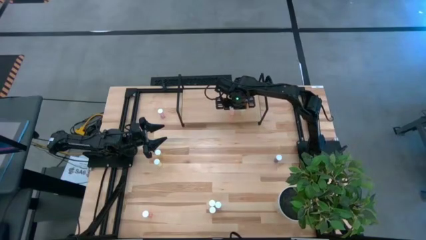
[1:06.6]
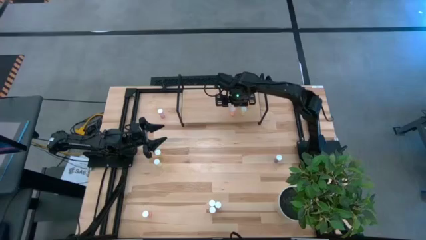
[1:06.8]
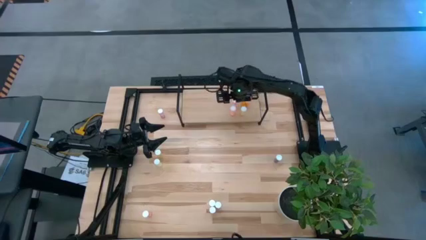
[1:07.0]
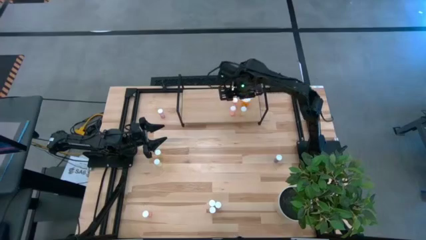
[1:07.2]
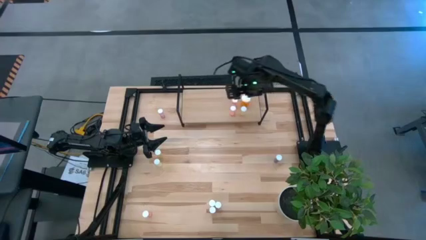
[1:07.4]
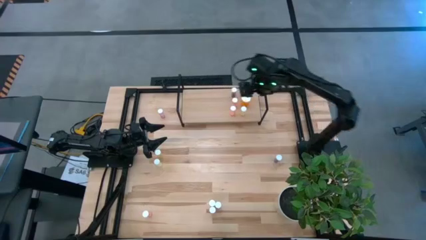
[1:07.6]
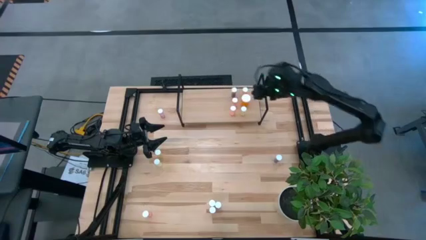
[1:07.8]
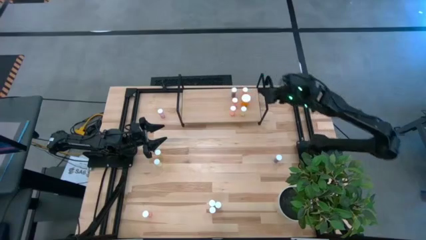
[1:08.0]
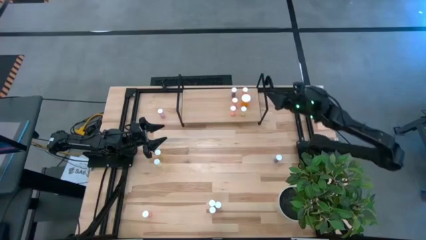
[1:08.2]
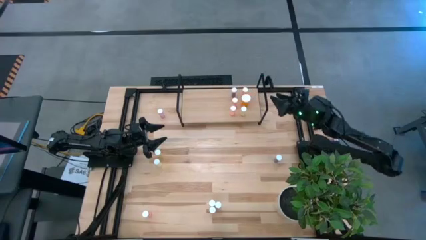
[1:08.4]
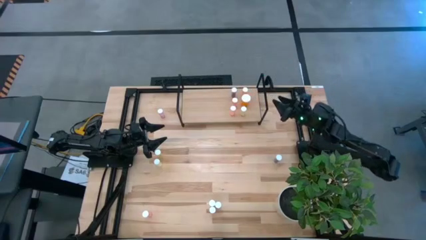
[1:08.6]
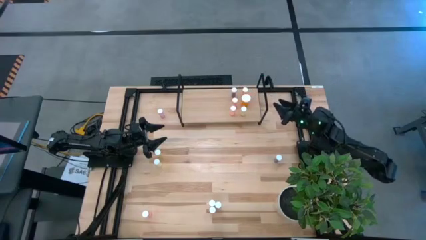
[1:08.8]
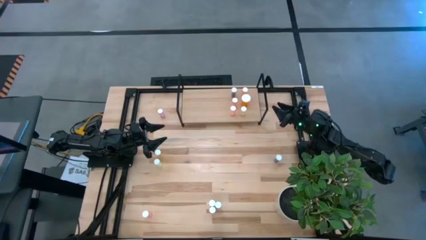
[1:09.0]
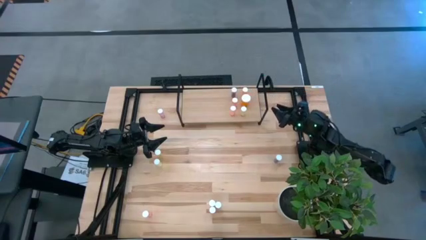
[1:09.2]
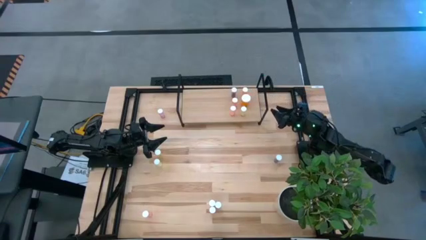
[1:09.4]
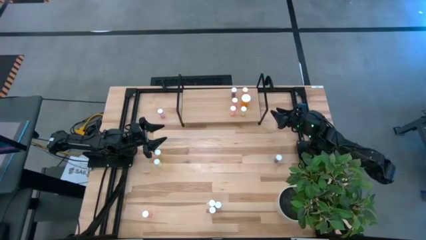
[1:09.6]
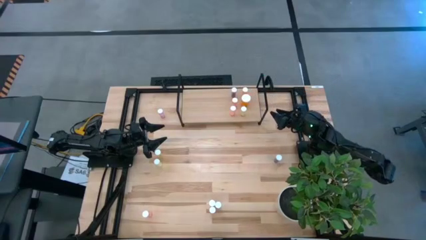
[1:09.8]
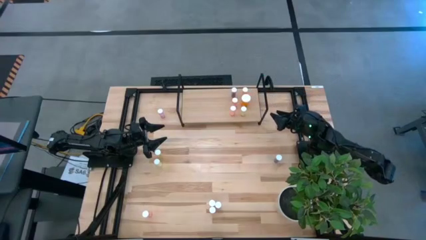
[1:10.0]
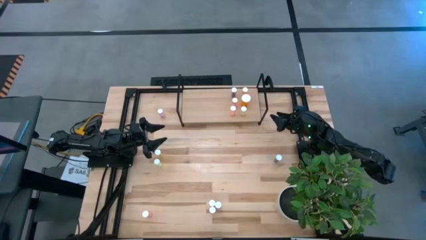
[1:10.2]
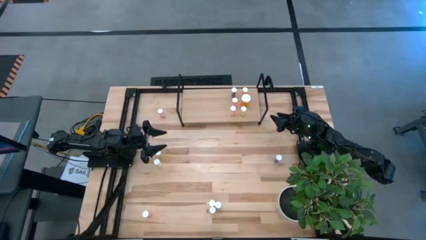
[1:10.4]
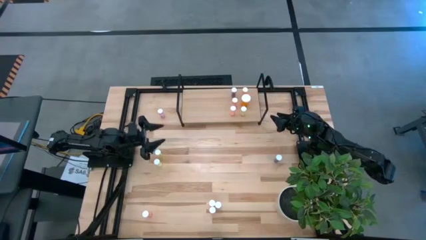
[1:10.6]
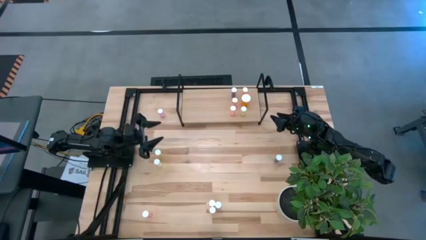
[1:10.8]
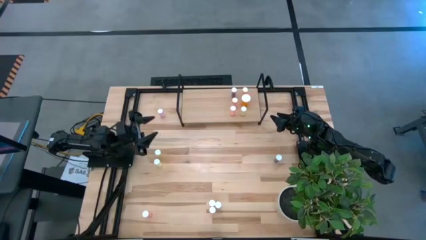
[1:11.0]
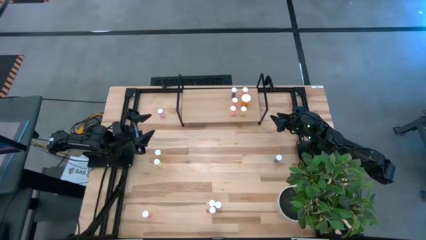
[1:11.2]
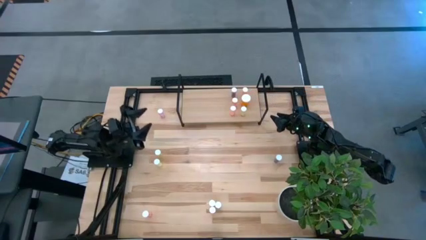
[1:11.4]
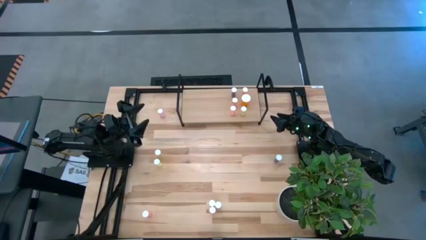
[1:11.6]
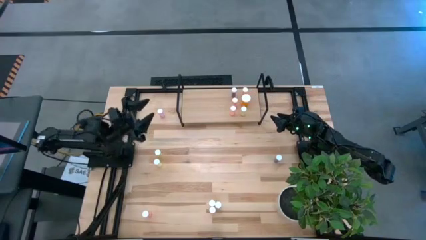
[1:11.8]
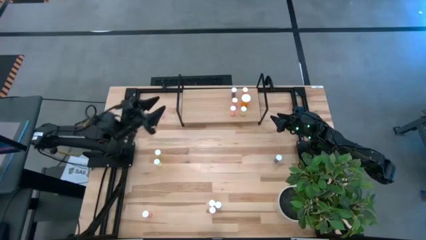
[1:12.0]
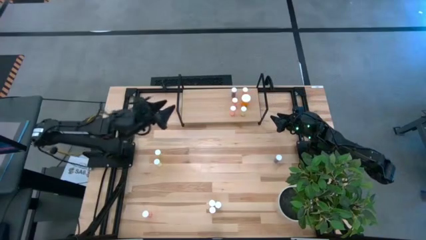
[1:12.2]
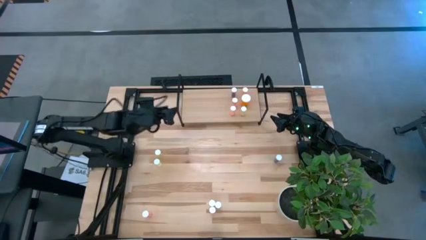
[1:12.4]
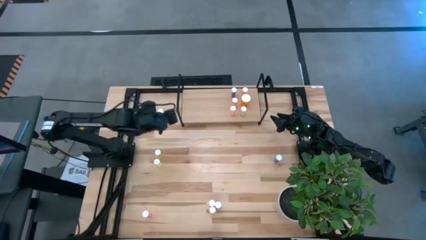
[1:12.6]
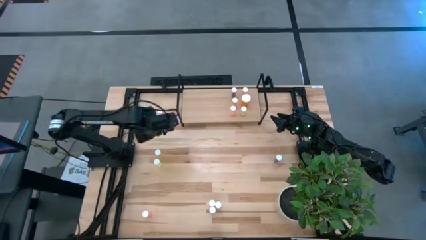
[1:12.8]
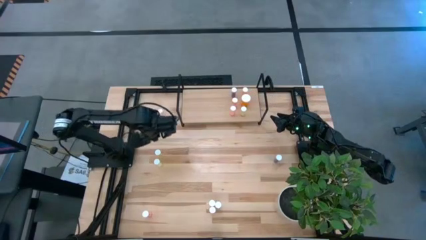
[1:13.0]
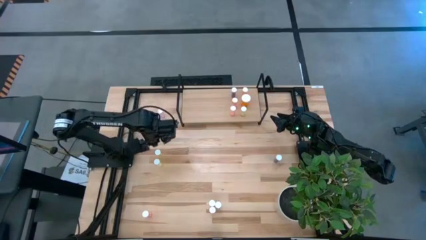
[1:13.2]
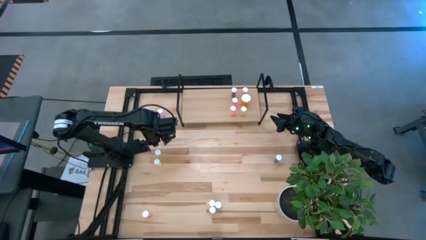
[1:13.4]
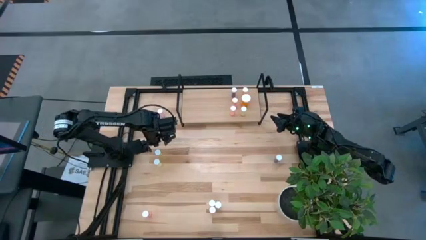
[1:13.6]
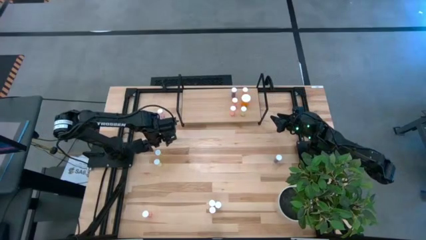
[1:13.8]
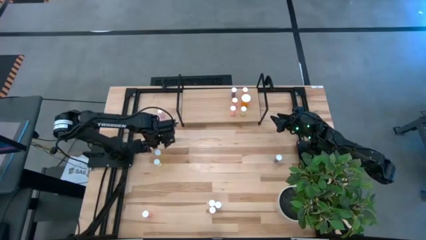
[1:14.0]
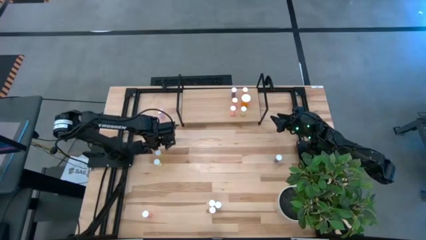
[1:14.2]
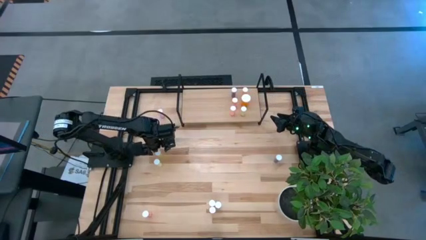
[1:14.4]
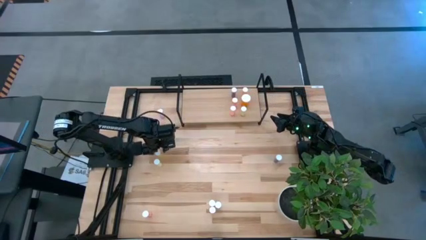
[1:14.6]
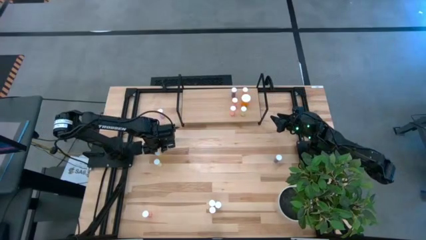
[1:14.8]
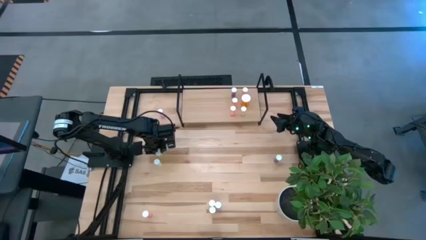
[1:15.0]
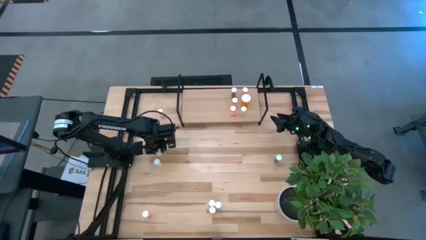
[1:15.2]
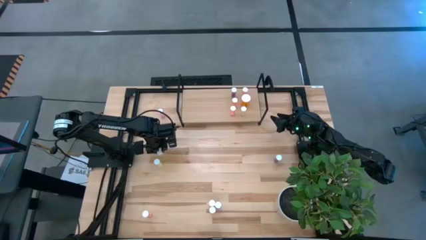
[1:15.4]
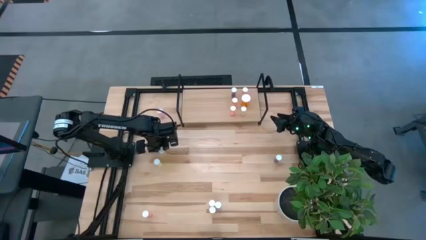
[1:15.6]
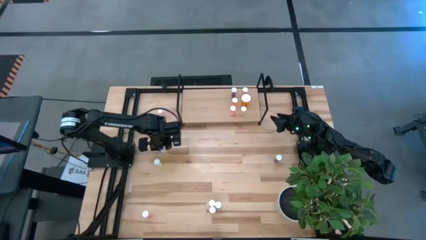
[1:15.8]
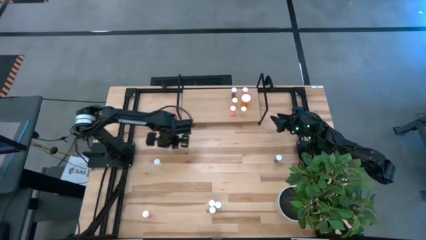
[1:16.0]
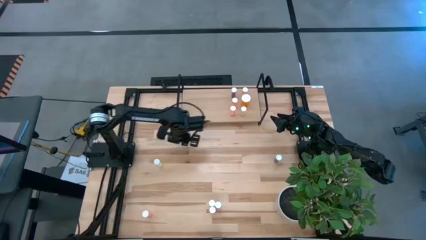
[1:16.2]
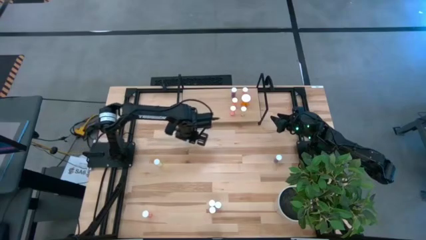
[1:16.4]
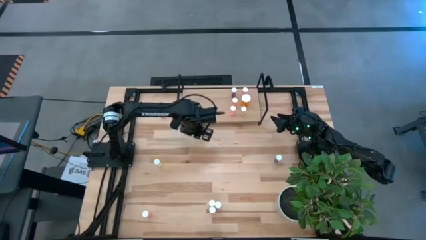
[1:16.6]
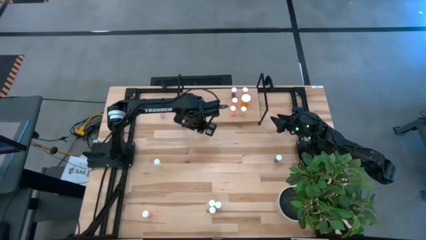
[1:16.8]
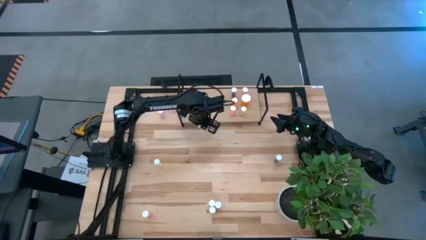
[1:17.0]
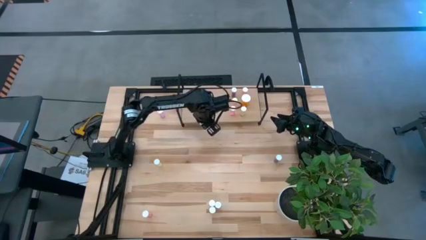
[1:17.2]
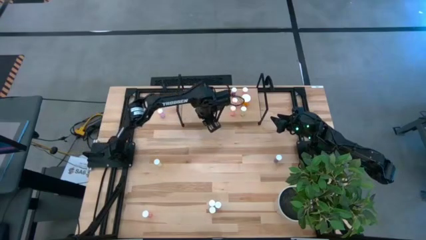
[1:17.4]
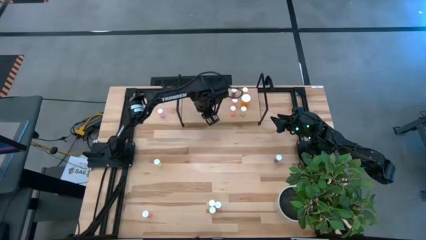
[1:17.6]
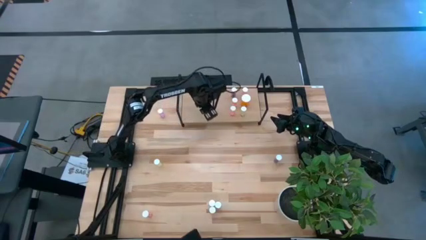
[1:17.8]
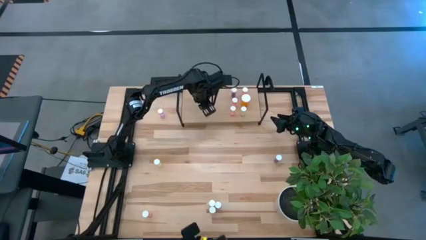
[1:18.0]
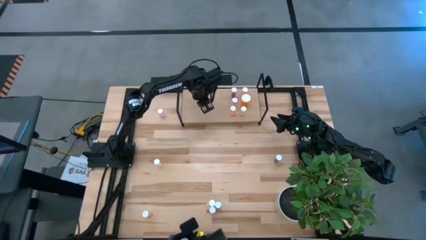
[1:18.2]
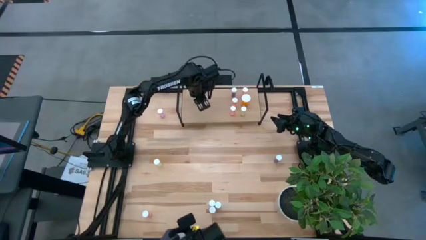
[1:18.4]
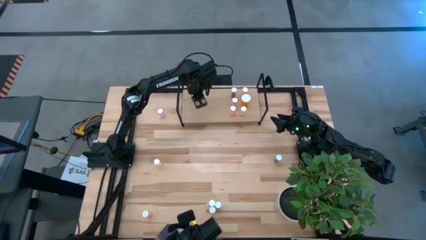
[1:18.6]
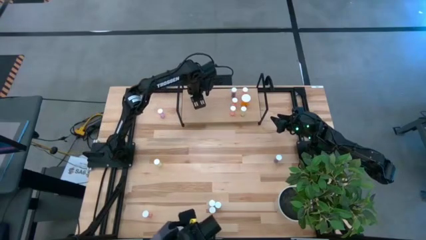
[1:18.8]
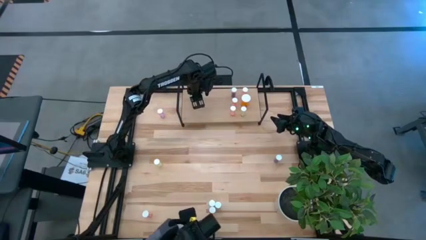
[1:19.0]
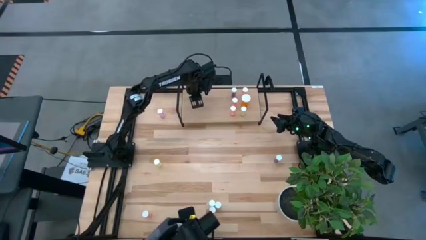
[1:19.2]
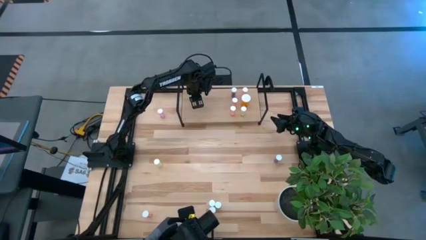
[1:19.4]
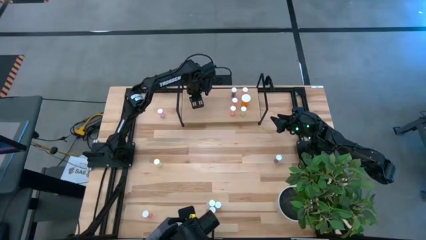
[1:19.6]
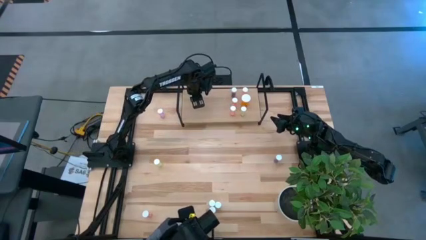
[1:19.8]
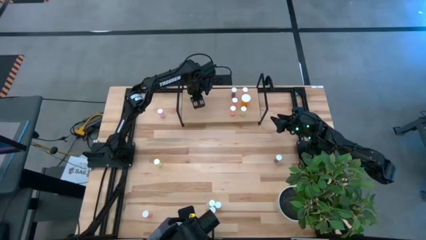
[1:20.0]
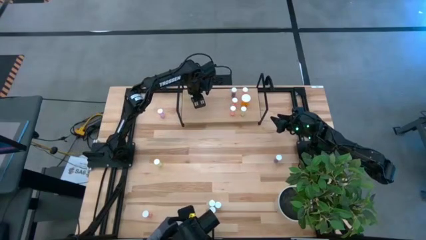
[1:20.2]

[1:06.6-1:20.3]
Task: Pick and place medicine bottles onto shelf by color
Put the yellow pill bottle on the shelf

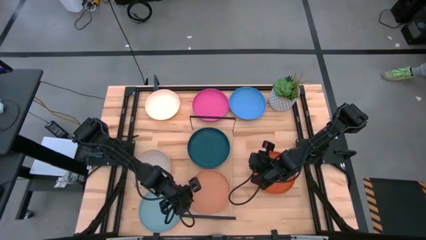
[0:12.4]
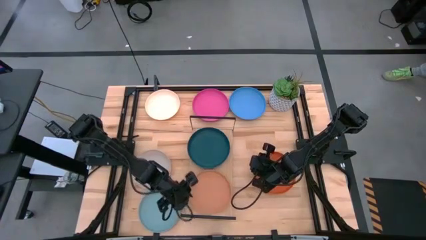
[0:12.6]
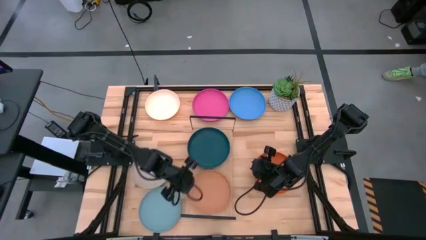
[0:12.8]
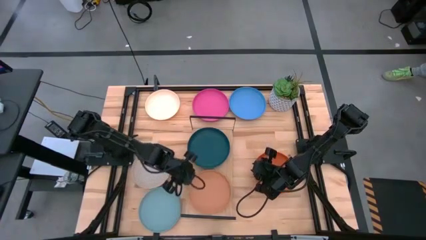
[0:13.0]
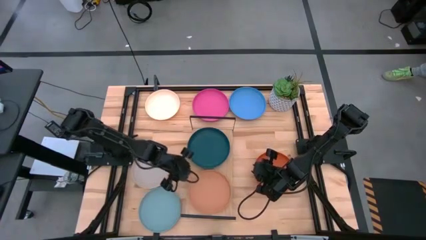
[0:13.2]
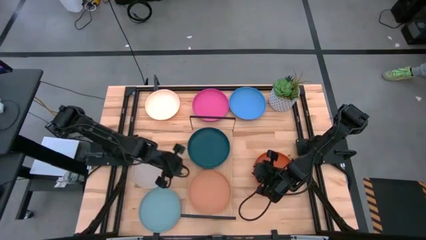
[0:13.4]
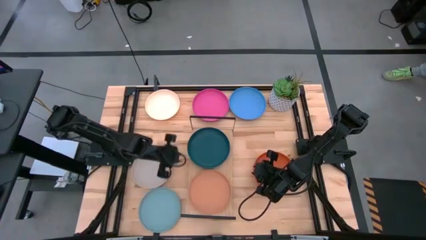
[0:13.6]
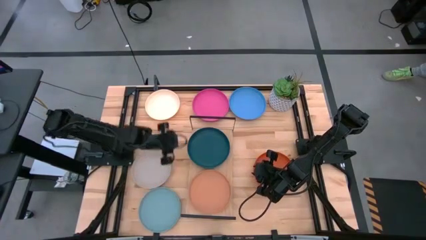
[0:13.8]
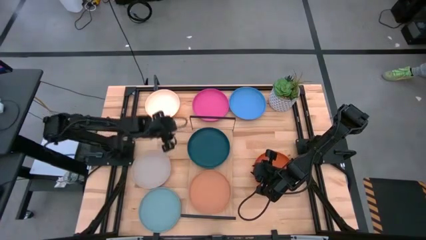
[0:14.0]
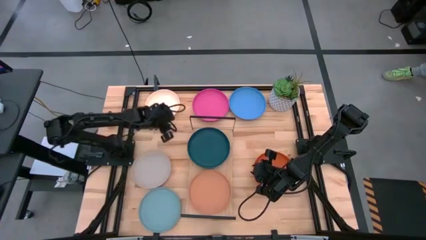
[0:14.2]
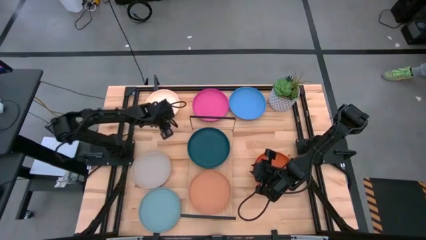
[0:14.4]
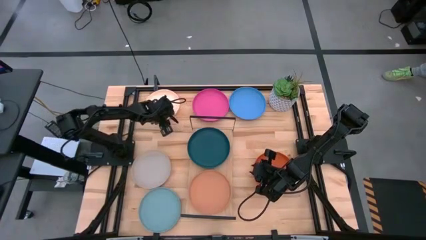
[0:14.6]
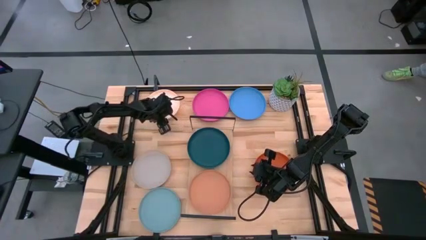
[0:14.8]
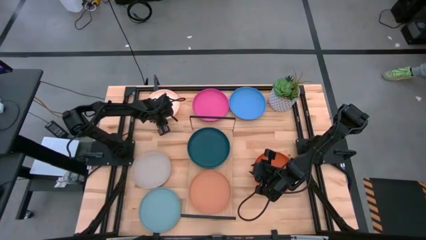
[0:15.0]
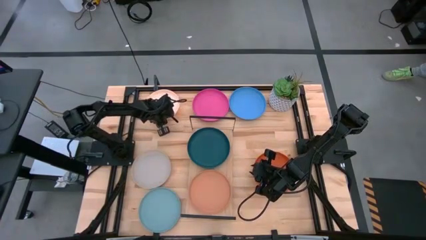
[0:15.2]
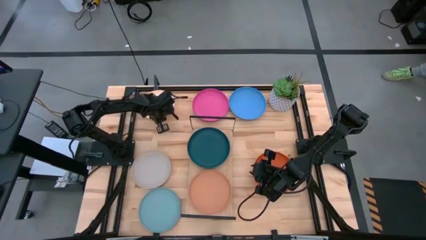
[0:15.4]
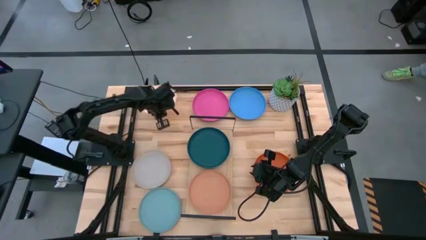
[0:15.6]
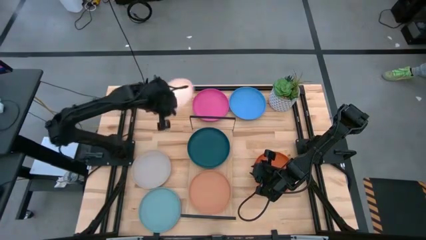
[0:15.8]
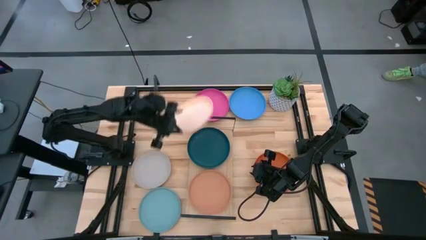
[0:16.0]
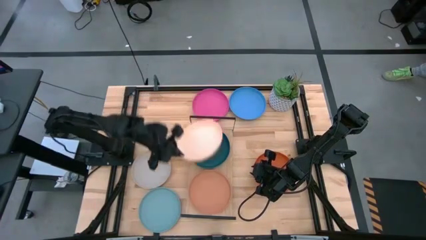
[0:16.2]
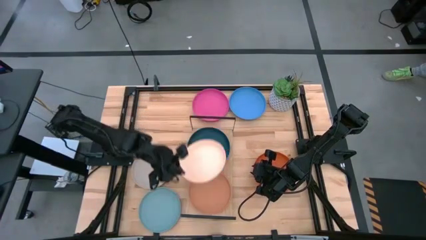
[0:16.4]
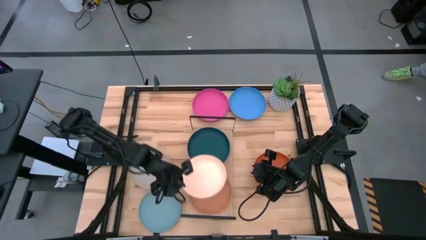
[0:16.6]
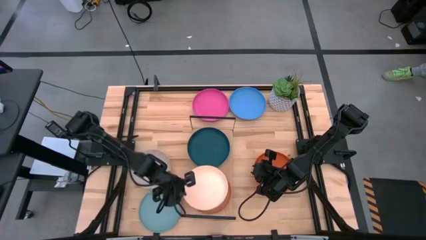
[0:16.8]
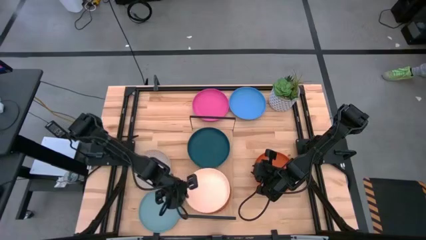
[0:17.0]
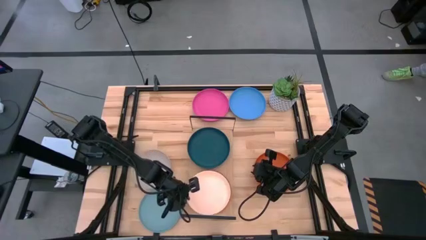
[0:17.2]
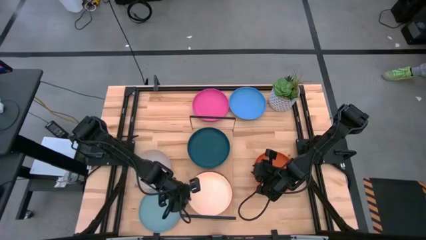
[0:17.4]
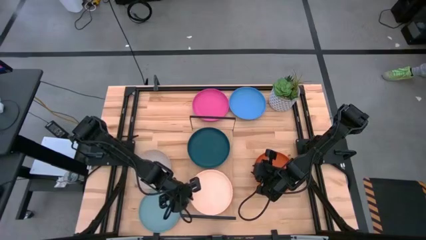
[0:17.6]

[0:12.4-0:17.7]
Task: Place and stack plates onto a shelf
Stack the white plate on top of the brown plate on the shelf
